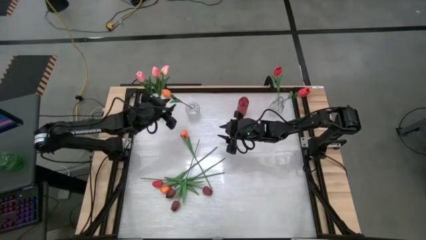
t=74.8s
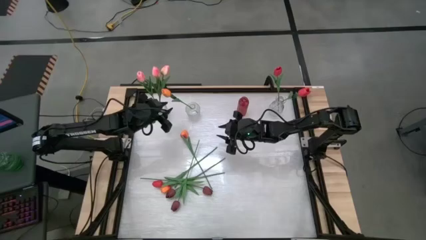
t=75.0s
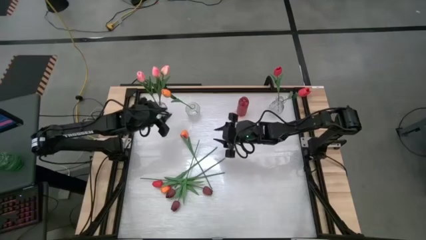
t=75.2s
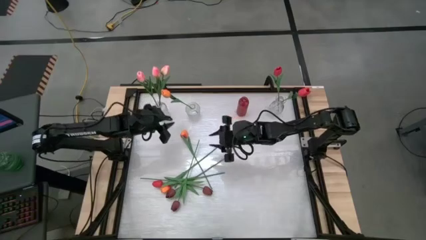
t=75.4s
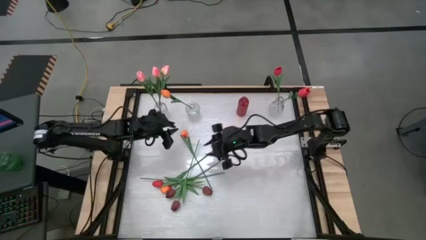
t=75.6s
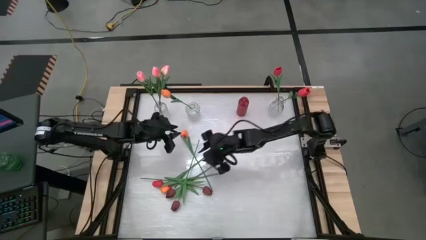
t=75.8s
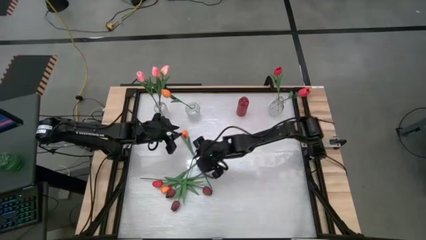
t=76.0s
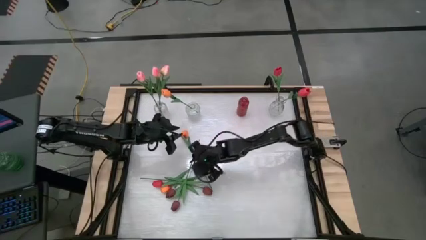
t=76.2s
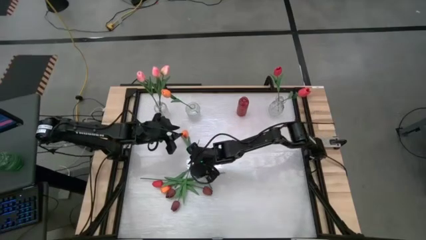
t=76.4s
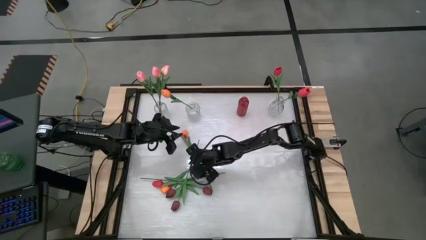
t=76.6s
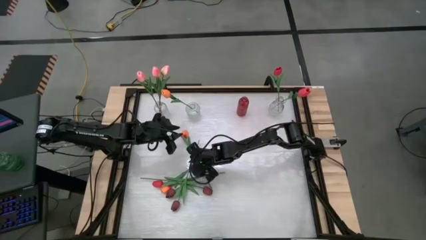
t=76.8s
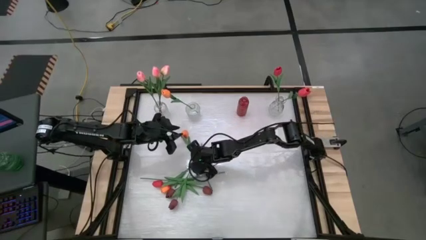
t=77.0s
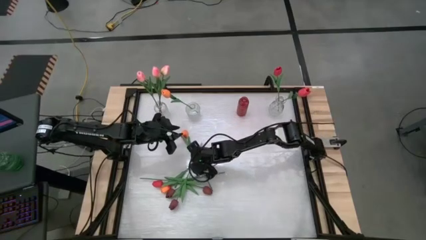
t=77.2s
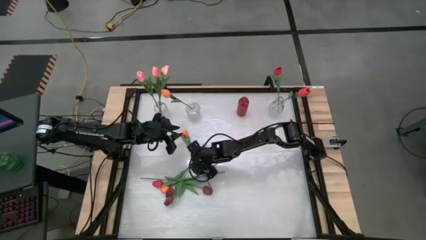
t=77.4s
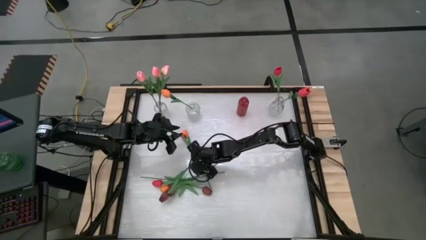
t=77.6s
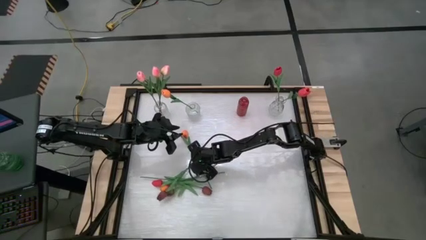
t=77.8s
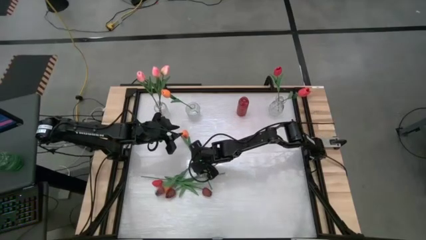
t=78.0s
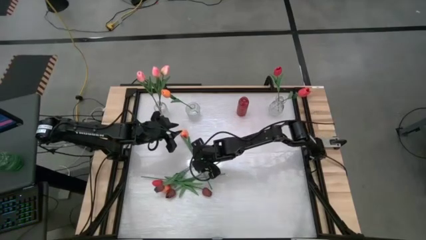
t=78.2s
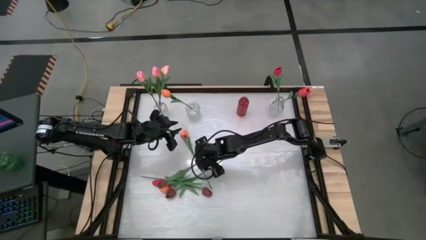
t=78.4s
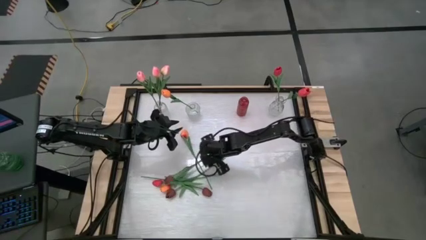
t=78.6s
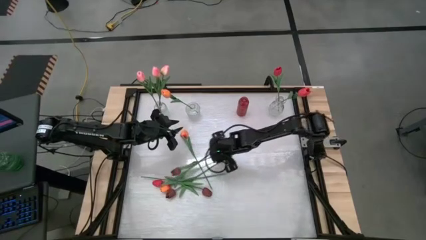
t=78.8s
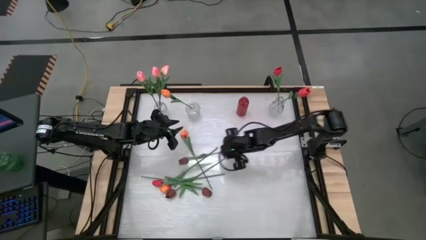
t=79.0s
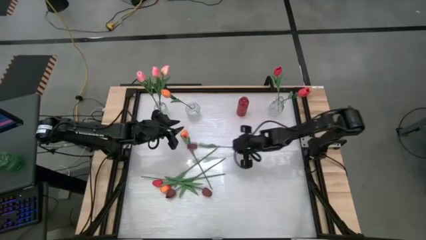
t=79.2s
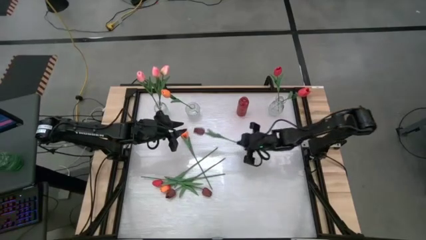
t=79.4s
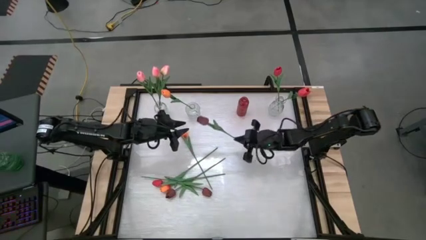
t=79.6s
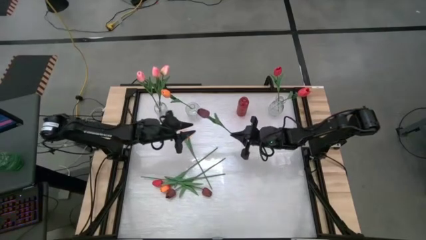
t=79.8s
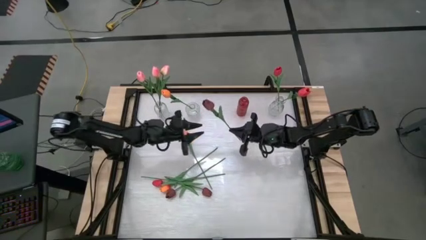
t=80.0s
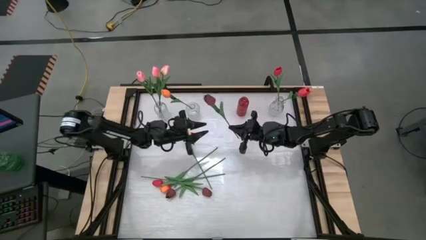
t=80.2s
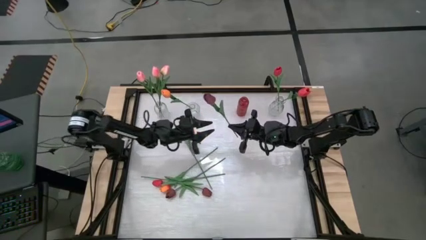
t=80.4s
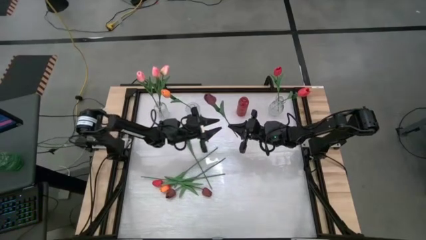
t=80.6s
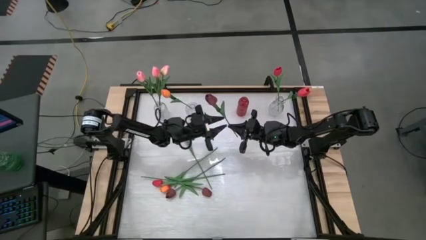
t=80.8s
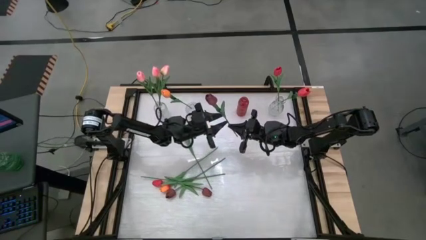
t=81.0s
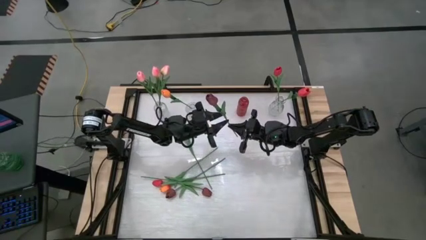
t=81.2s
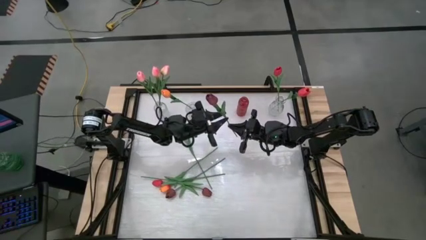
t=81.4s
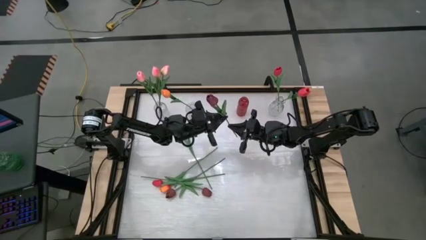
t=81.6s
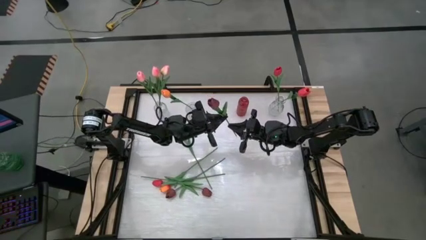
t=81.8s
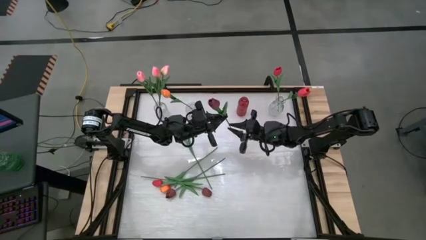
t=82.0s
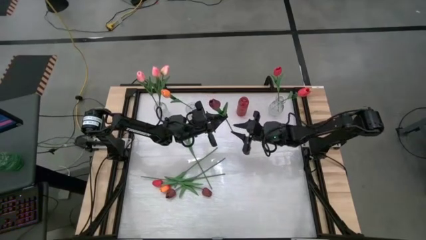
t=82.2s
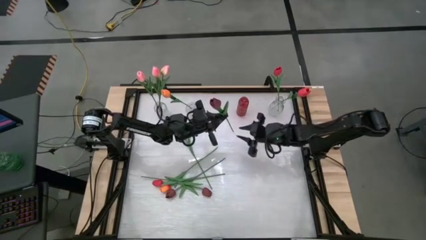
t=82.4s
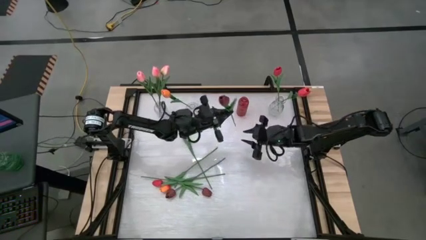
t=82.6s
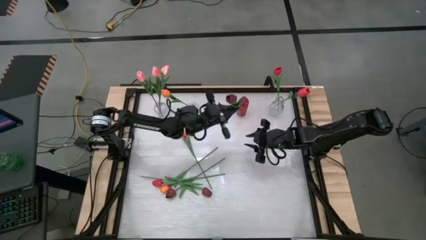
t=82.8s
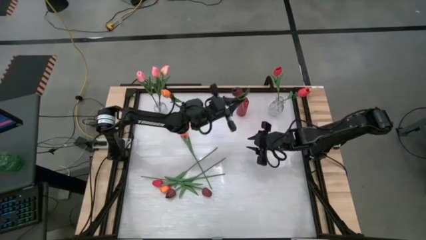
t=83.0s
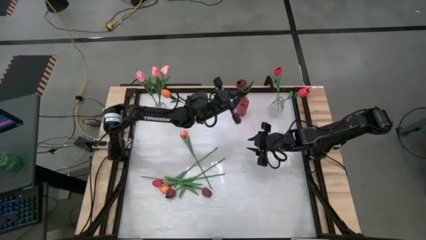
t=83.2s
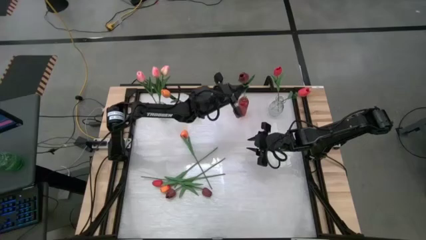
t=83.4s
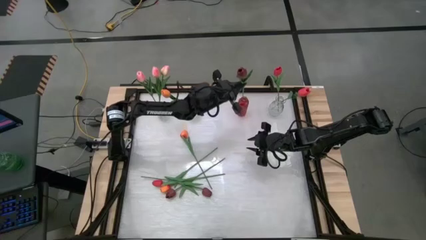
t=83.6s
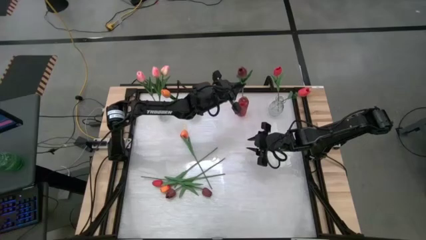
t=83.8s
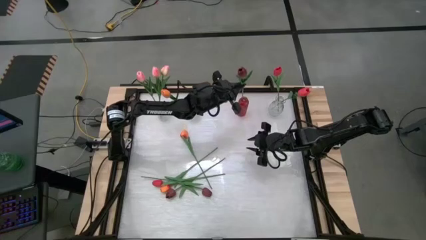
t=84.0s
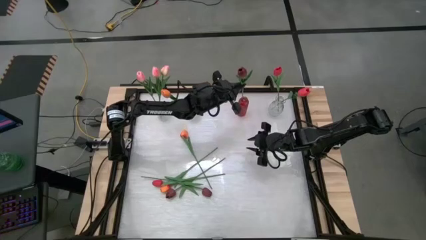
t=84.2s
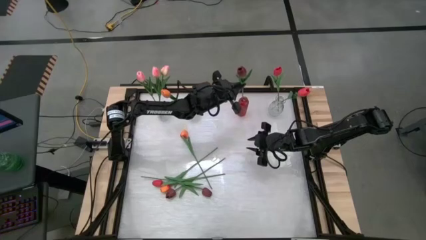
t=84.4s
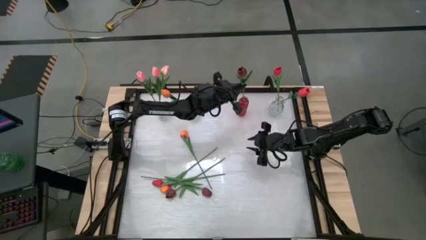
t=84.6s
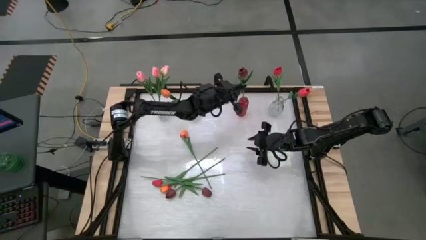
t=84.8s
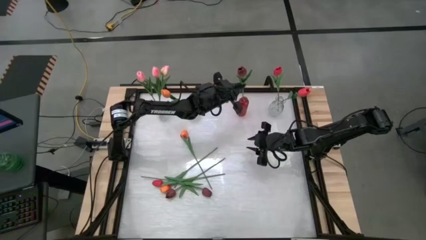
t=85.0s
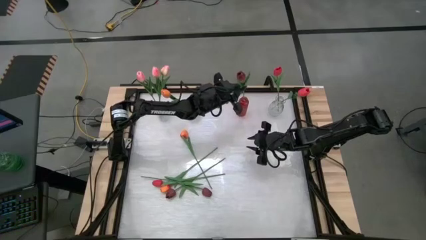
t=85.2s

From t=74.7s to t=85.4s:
Task: Sort flowers into vase by color
Put the red flower into the red vase

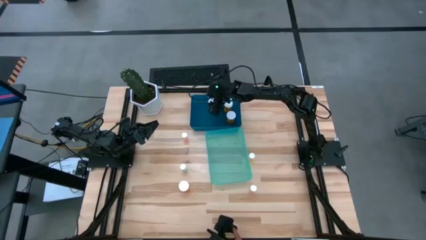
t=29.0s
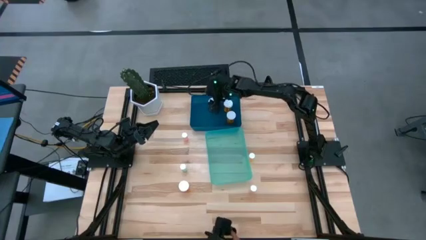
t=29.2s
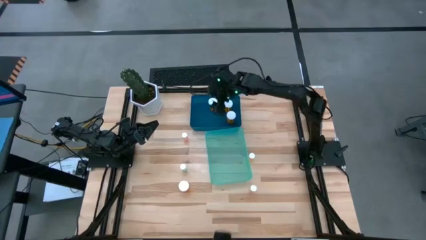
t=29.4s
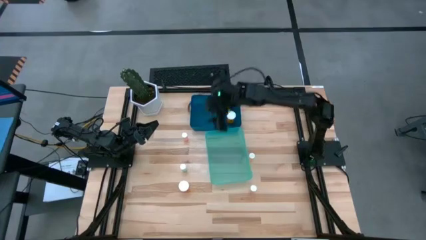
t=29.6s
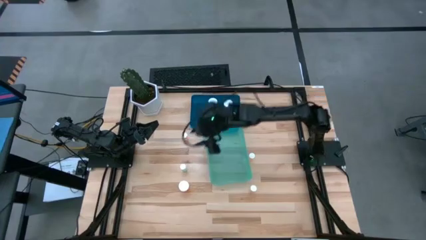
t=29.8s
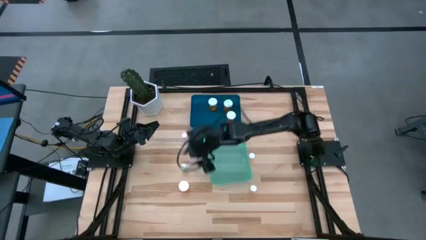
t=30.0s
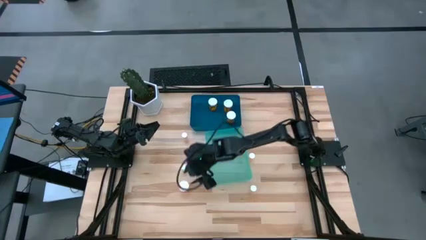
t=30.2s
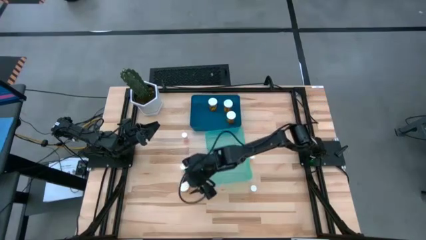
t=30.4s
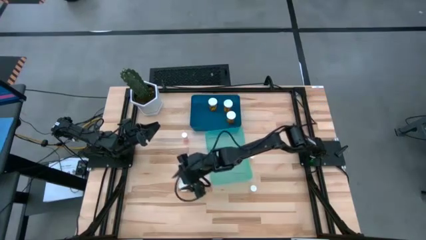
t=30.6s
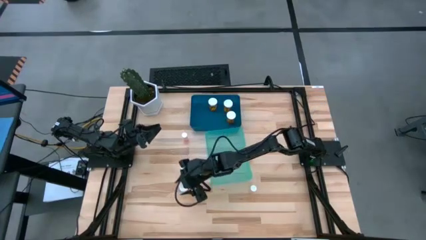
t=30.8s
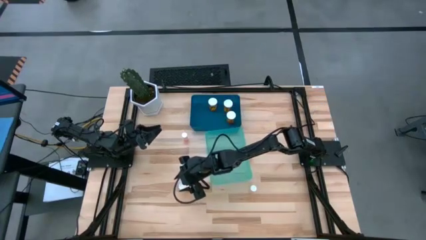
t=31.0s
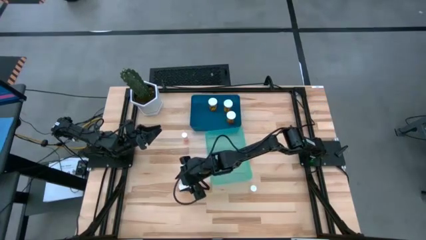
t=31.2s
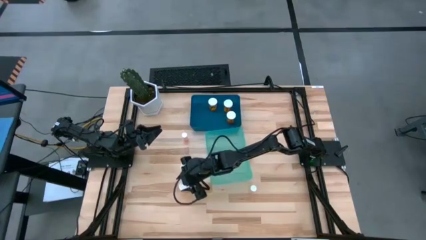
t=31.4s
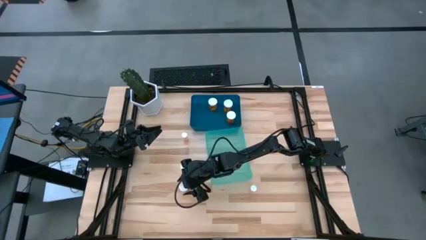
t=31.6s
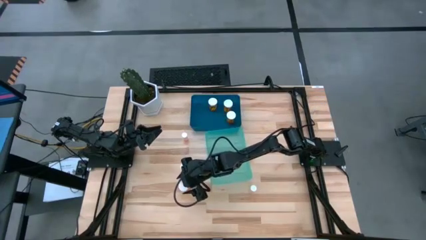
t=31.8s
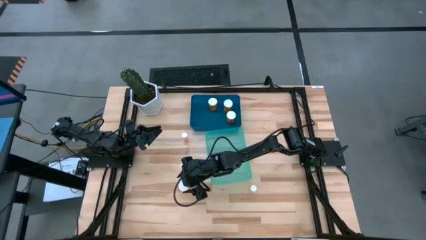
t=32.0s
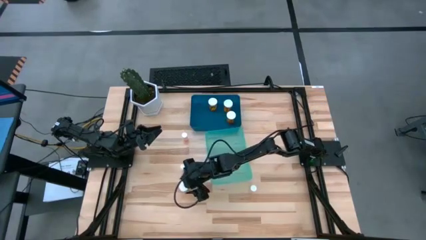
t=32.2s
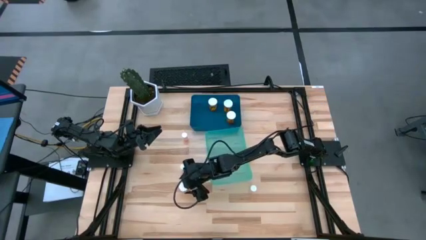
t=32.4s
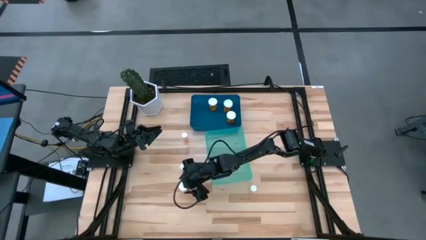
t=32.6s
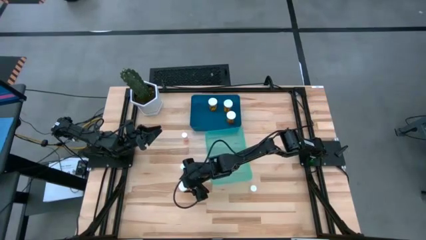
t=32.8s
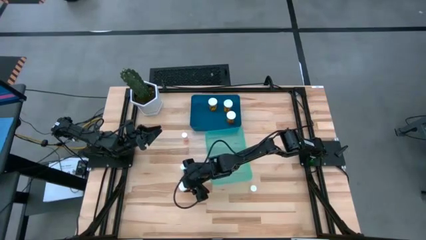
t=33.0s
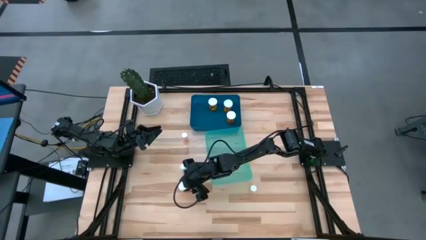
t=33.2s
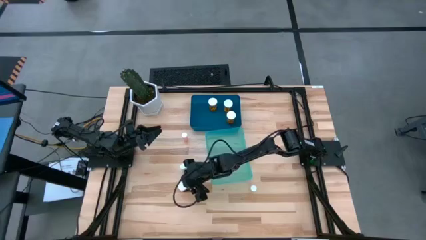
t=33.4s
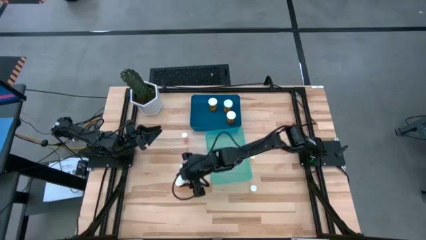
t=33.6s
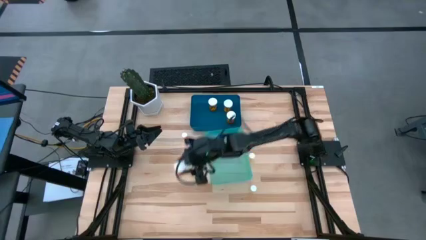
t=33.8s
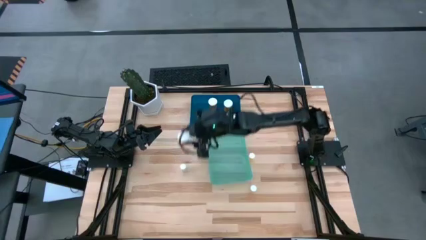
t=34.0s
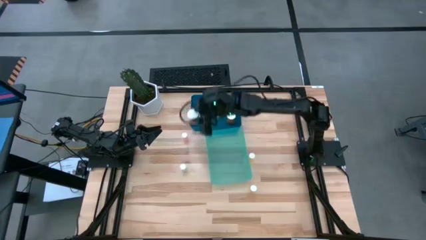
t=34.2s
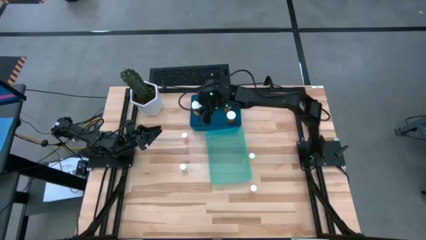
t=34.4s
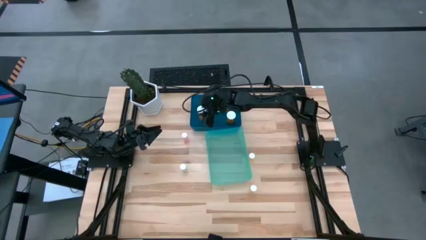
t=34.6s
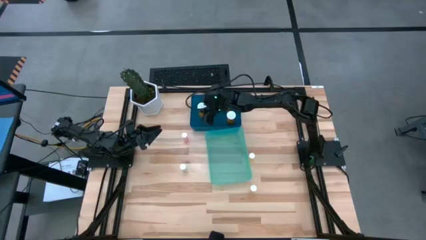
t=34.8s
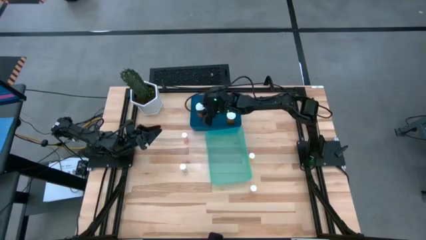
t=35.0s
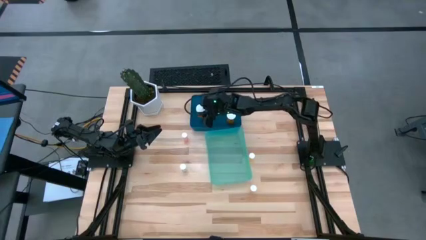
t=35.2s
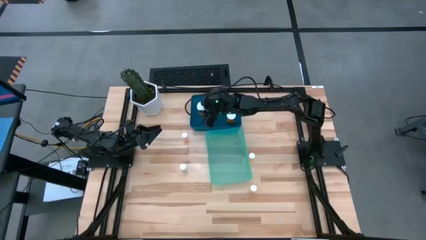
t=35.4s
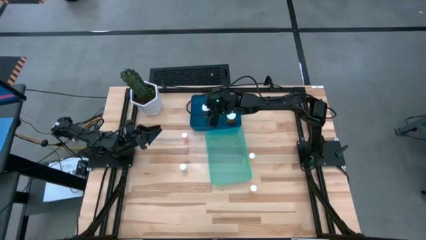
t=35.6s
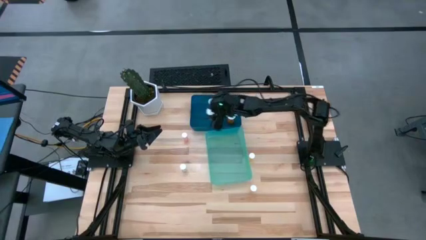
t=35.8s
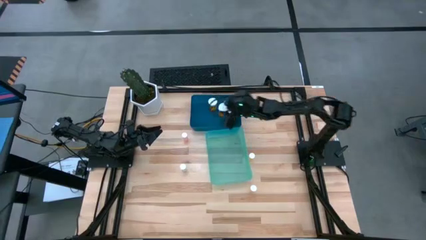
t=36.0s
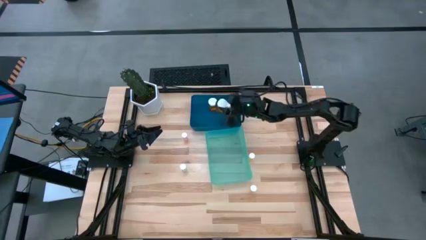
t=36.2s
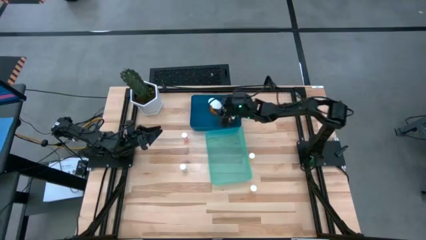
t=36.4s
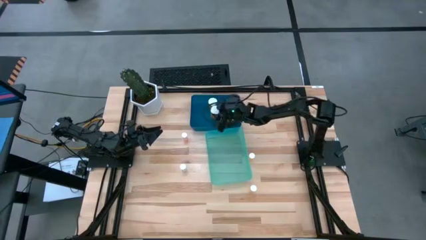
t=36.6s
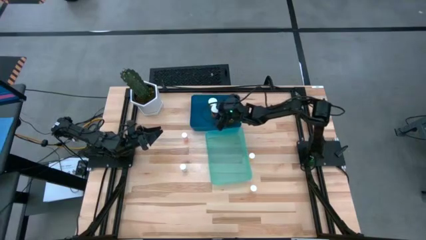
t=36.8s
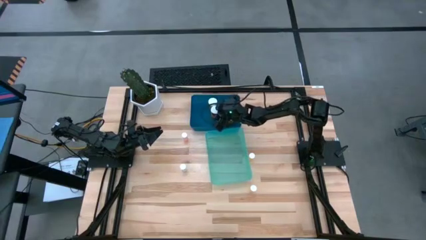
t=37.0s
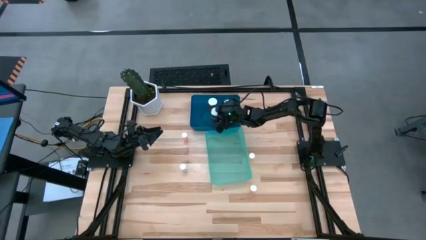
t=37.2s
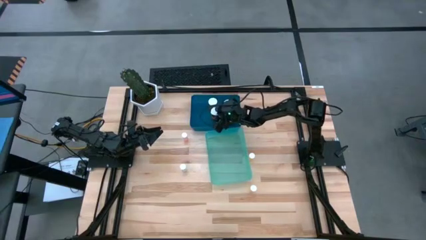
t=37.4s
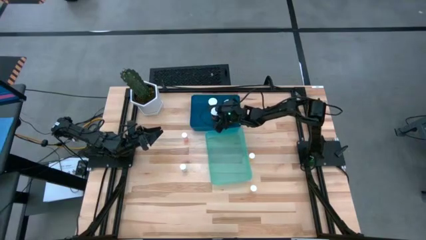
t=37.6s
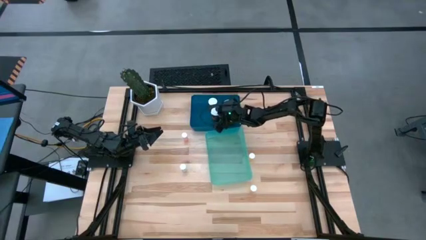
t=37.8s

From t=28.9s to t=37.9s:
Task: Pick and place medicine bottles into bin by pill shape (circle, oval)
Put the large orange pill bottle into the blue bin
